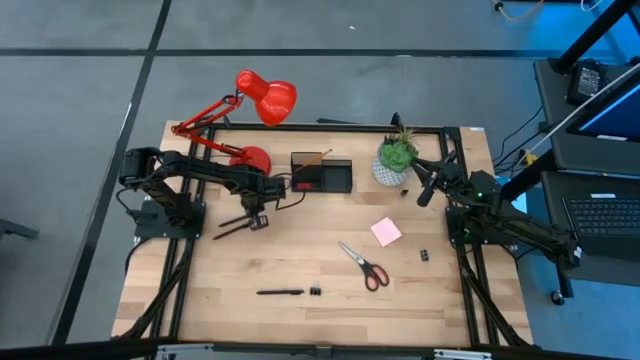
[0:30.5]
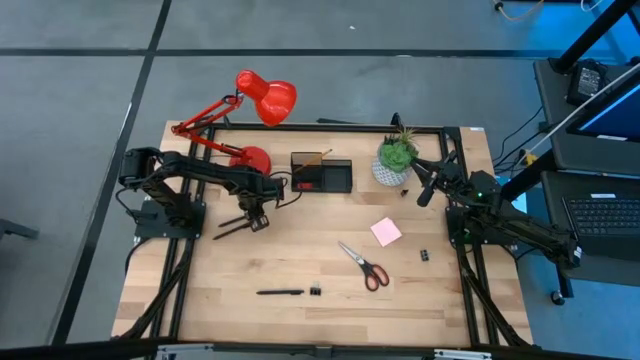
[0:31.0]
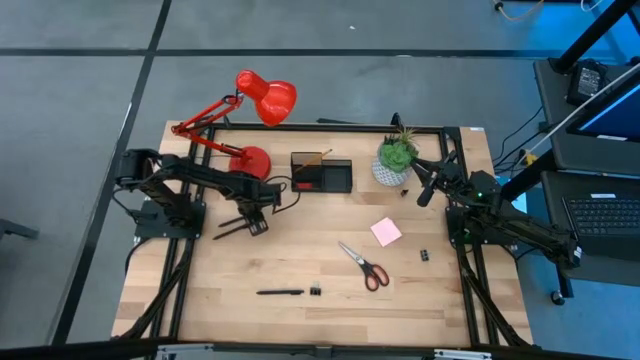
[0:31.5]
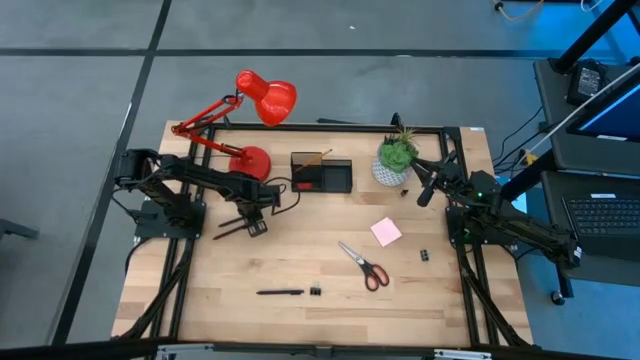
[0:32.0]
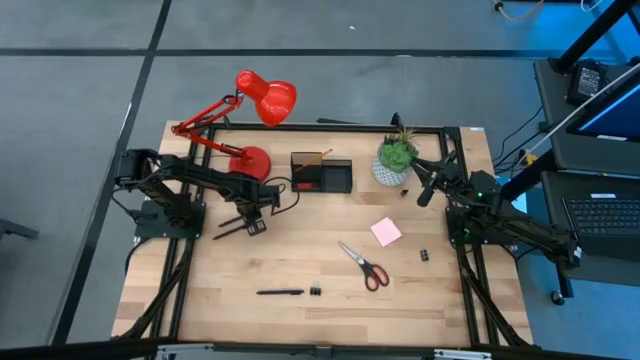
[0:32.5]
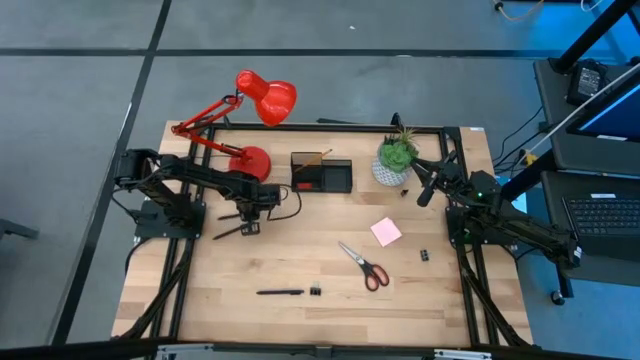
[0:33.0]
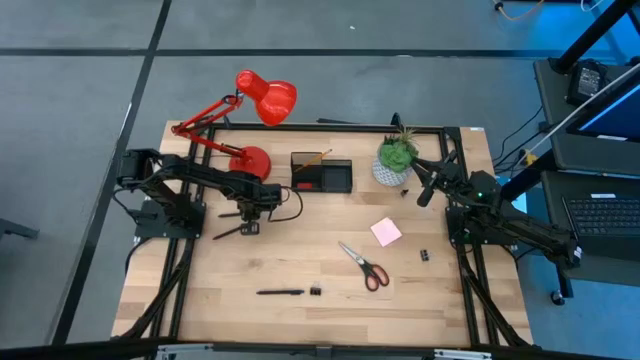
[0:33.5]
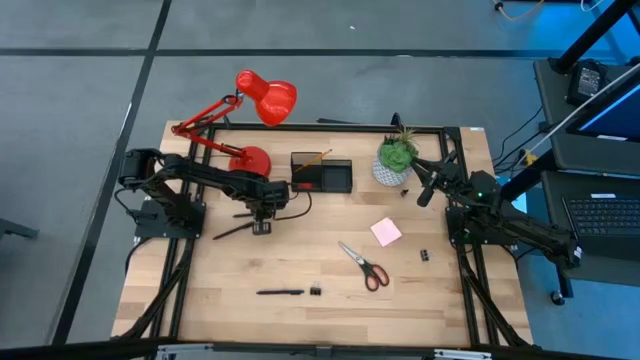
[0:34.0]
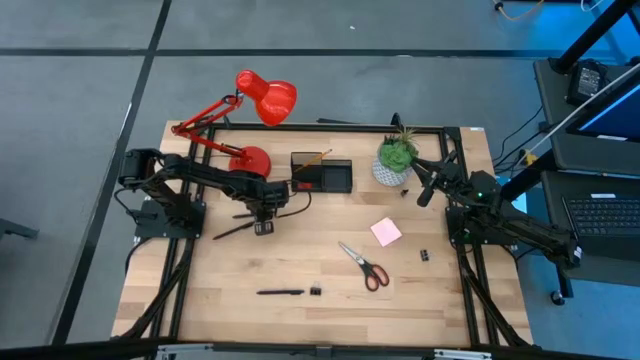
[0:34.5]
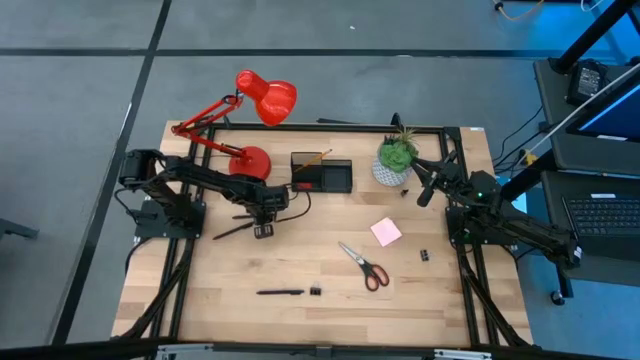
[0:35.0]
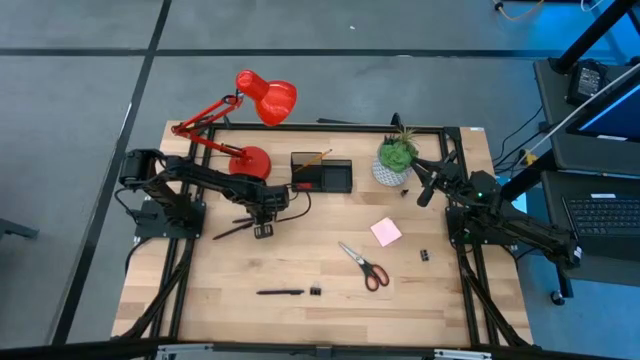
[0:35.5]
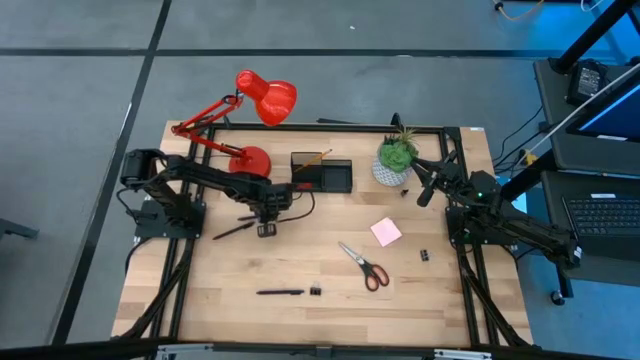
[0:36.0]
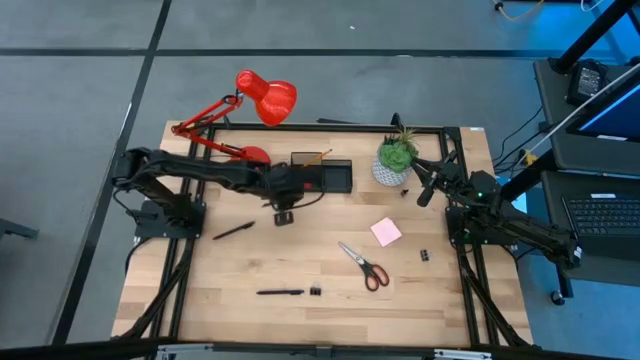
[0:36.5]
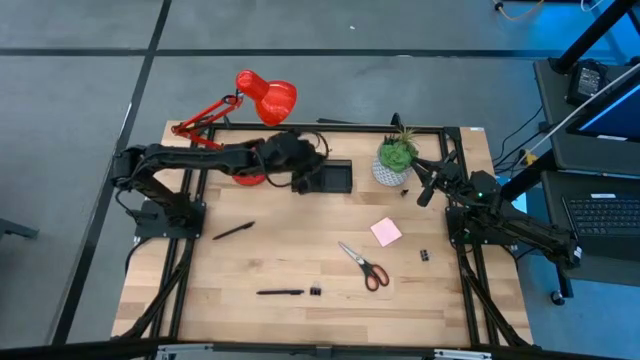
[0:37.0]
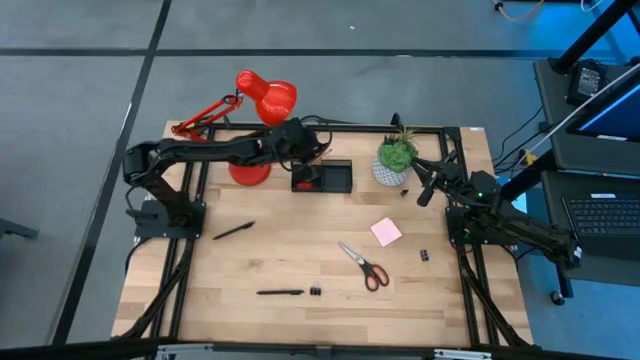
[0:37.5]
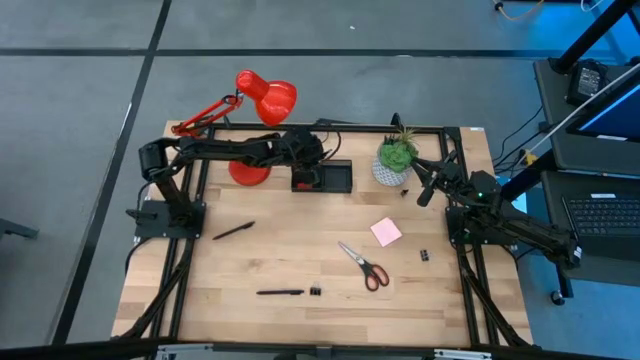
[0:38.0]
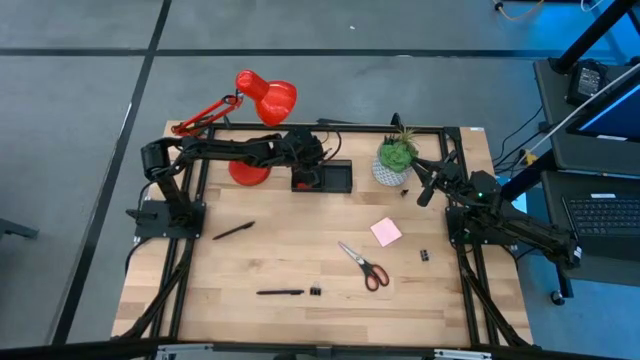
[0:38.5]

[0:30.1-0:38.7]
Task: Pick and place office supplies into organizer
Put the top pen into the desk organizer

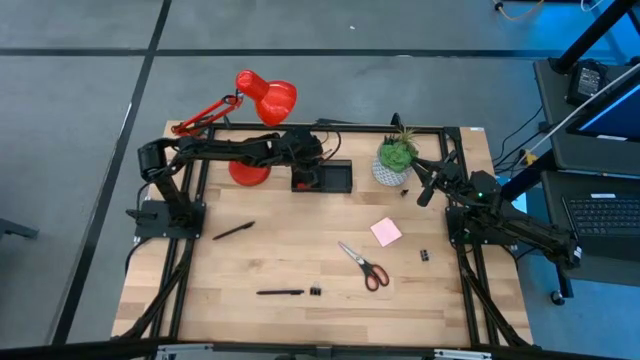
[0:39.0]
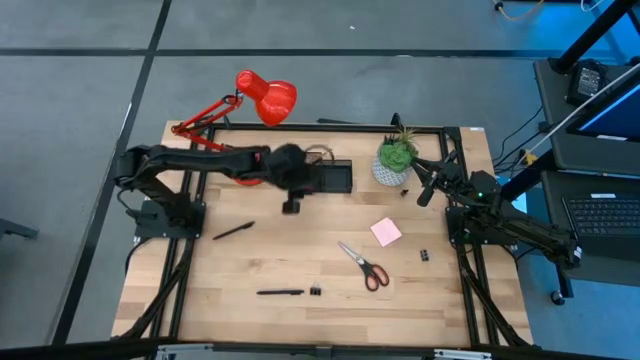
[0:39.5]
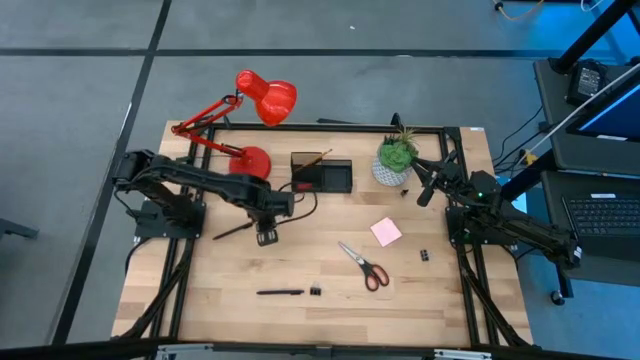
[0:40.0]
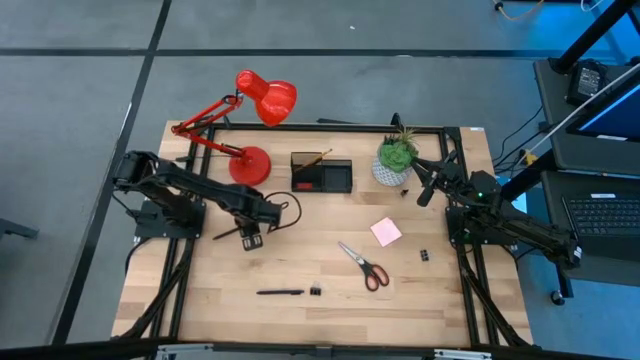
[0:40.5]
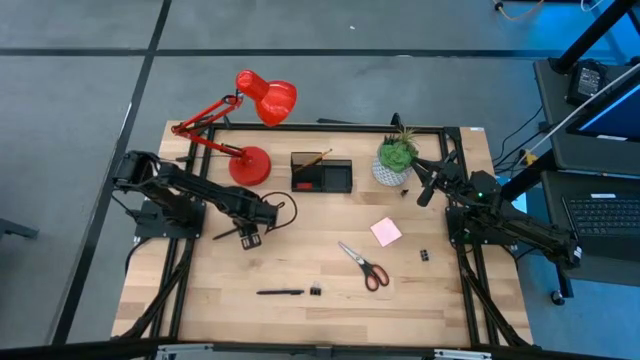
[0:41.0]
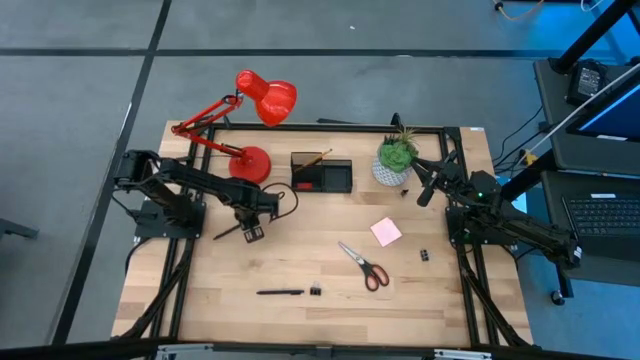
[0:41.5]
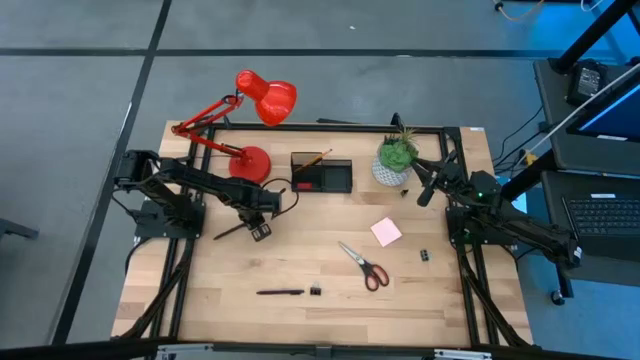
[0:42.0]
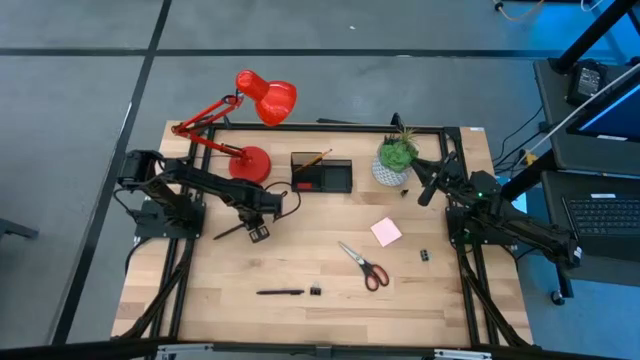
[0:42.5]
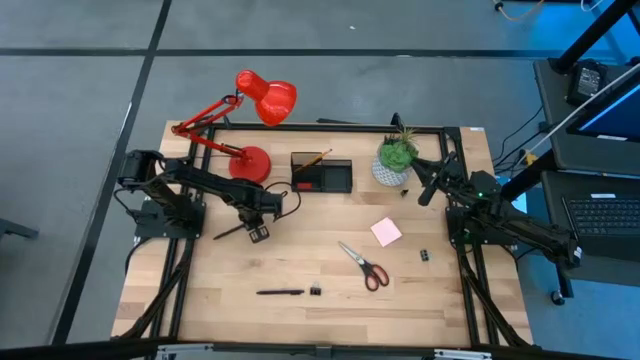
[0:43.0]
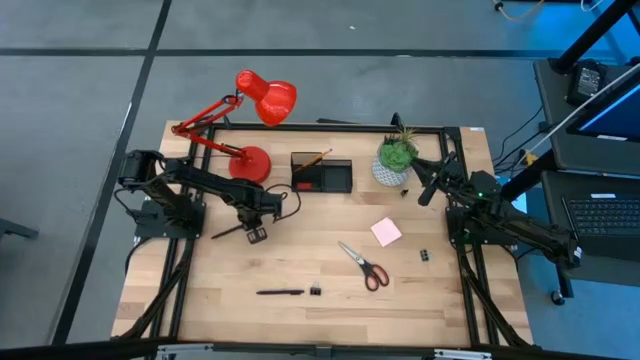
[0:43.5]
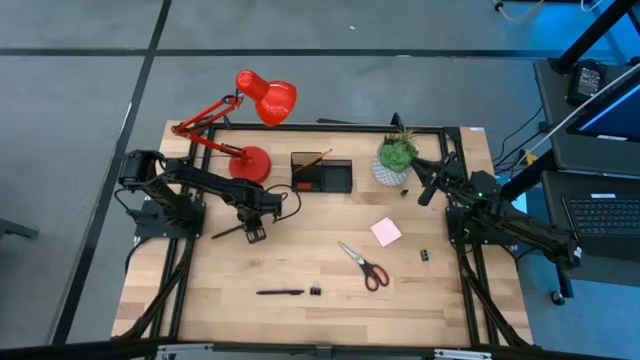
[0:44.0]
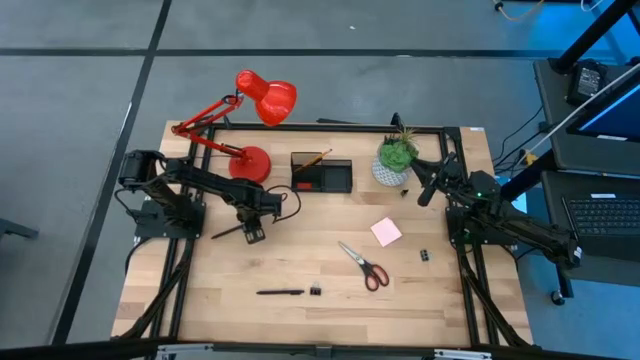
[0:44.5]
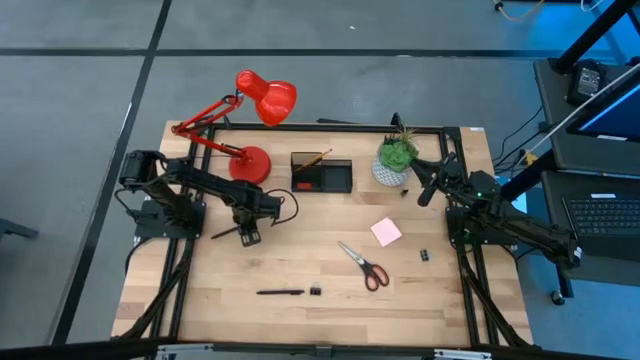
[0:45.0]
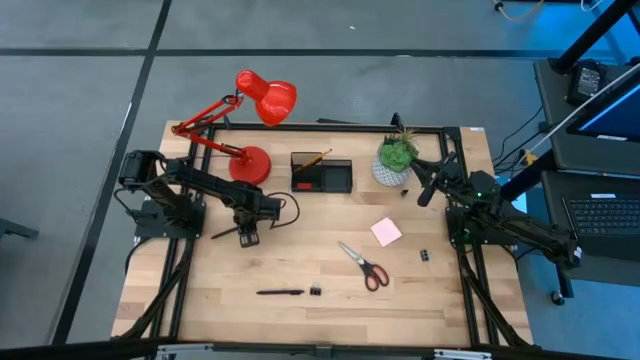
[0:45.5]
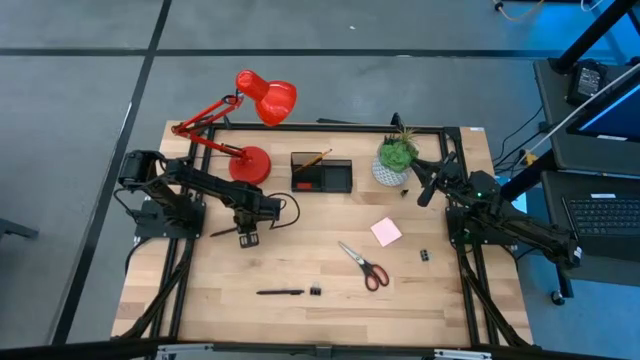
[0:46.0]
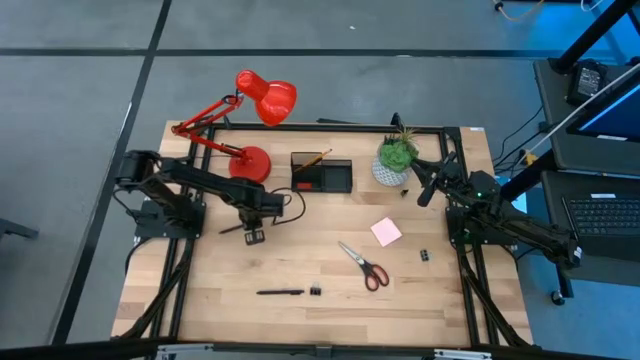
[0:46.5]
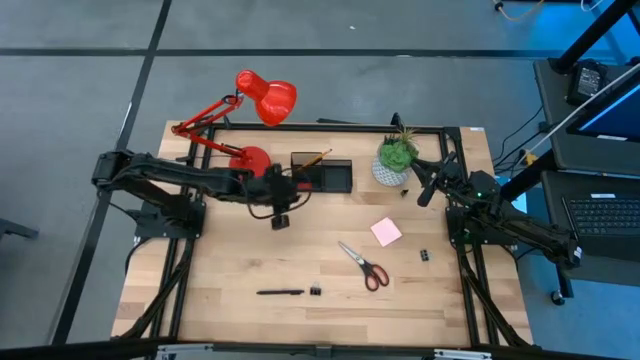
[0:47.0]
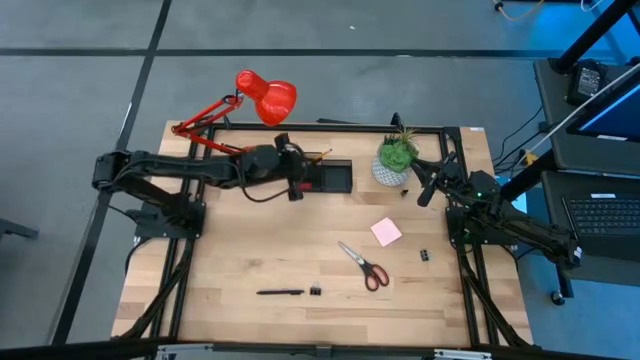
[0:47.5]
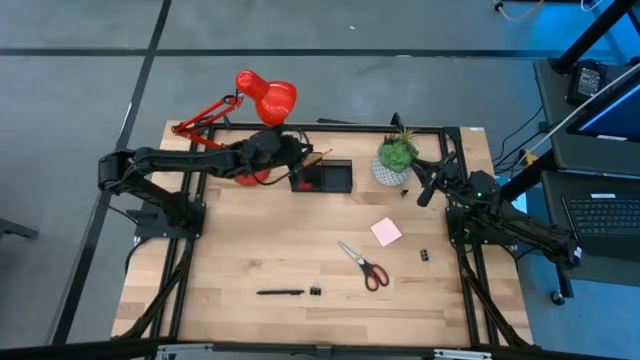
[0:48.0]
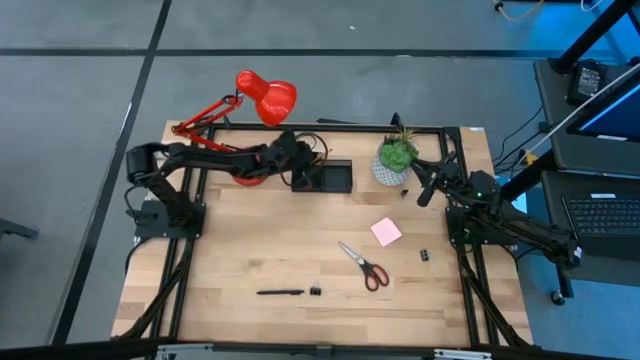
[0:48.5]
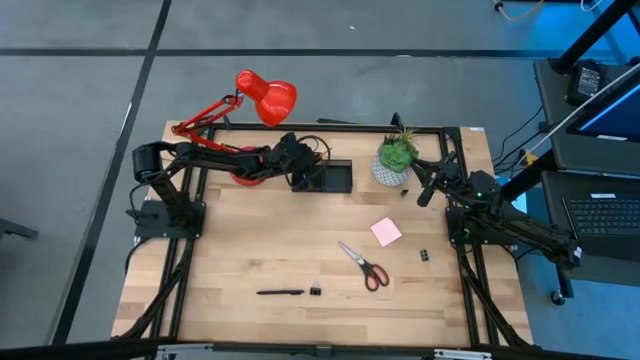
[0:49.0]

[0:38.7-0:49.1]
Put the top pen into the desk organizer

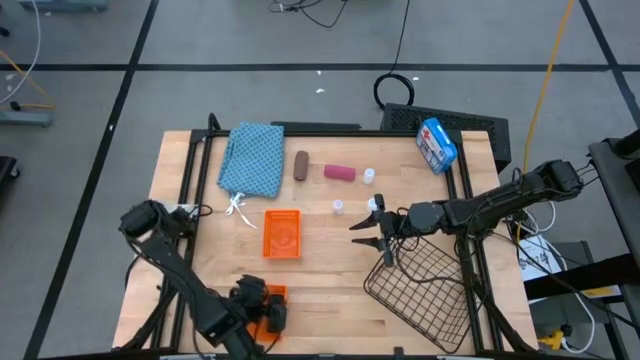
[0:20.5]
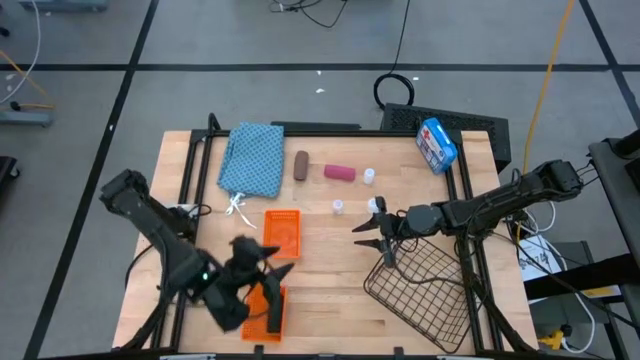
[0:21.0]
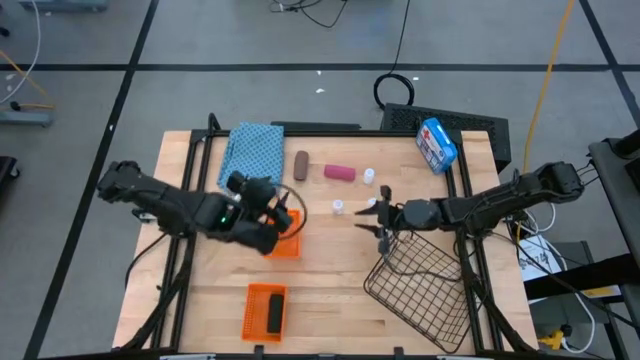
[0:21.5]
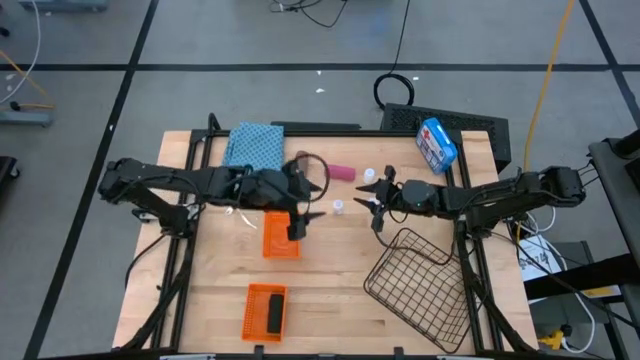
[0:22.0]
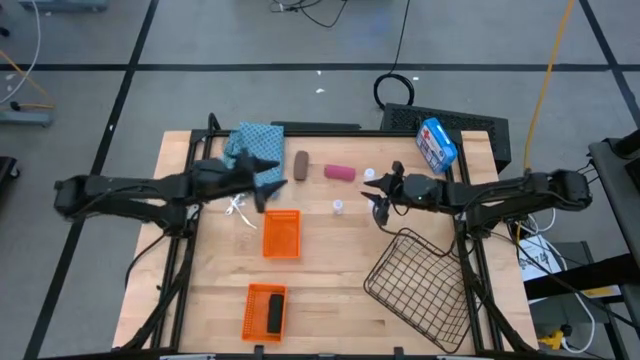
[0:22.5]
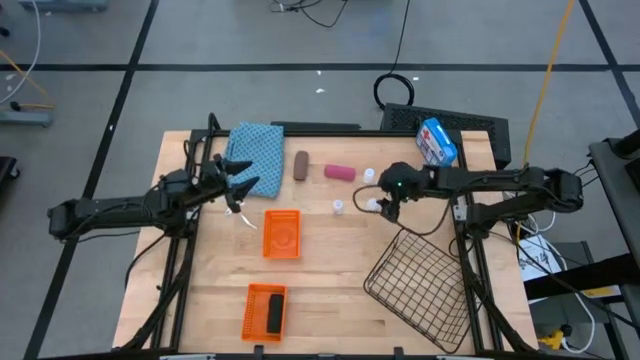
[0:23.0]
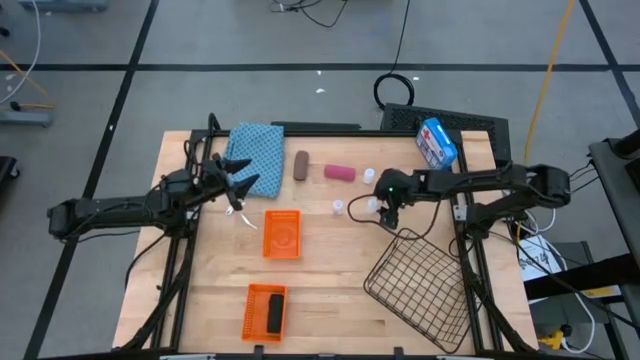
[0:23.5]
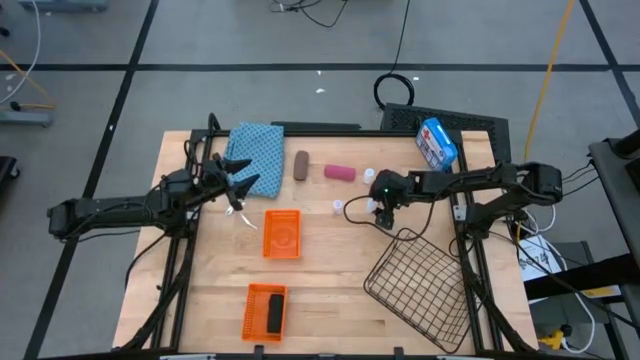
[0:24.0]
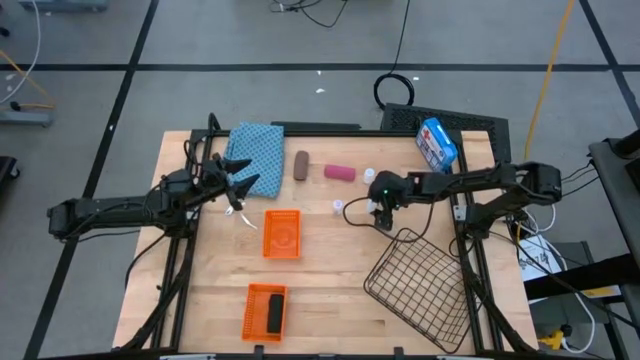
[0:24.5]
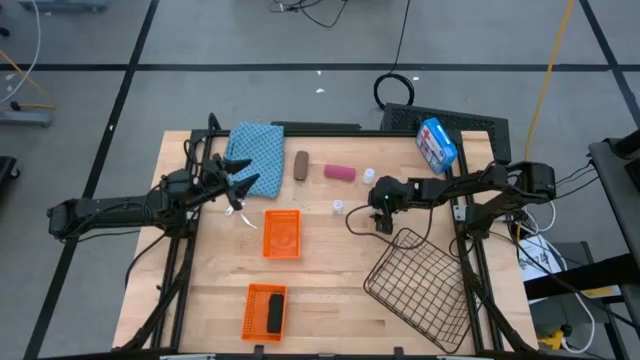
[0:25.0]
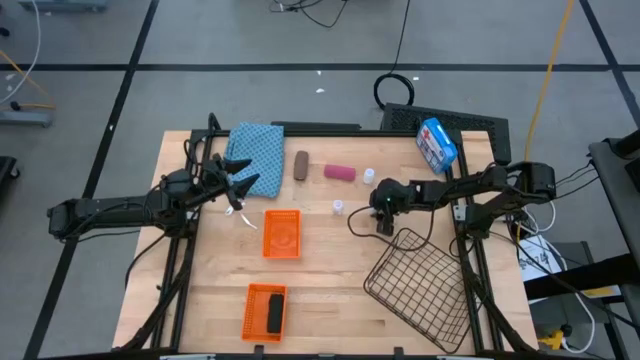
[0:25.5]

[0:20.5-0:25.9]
Task: Pick & Place Medicine items
Put the bottom white medicine bottle into the top orange basket
